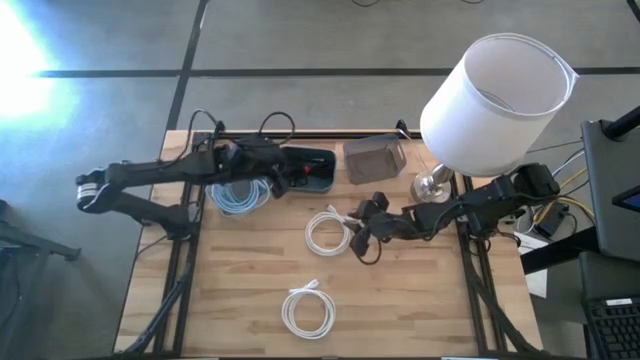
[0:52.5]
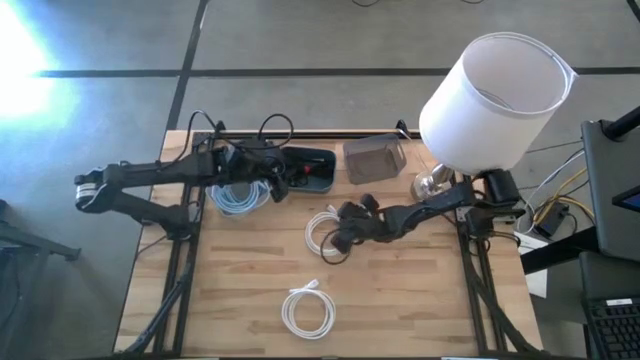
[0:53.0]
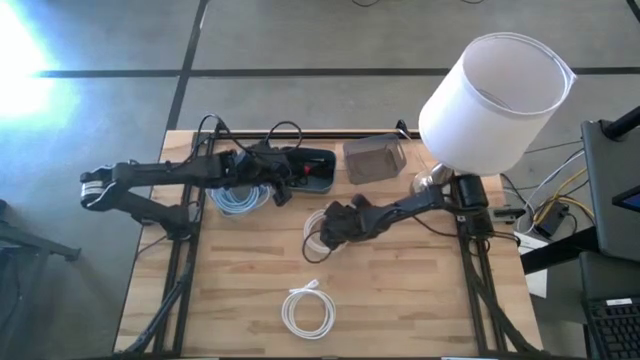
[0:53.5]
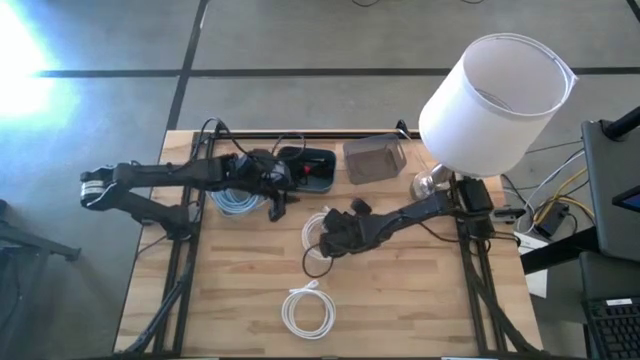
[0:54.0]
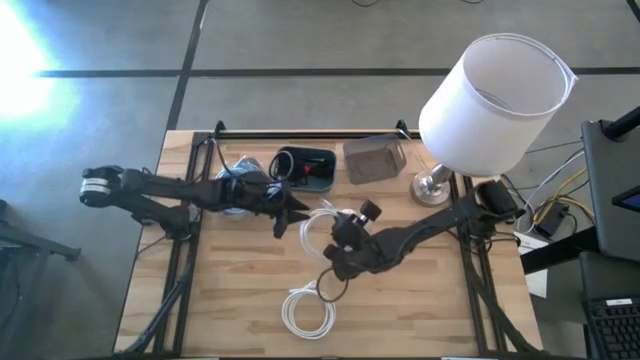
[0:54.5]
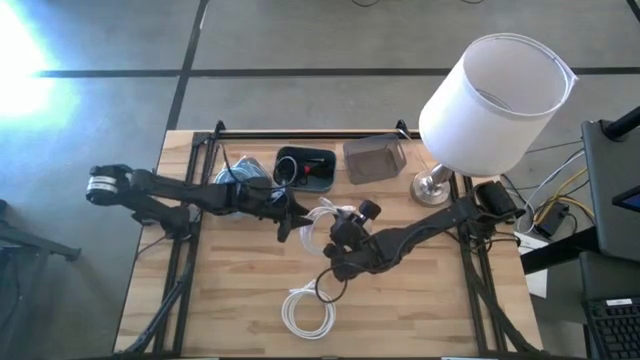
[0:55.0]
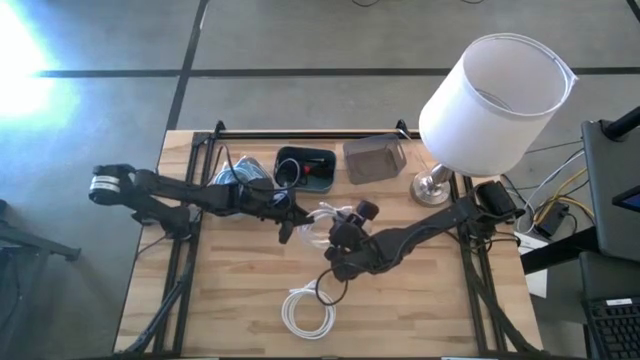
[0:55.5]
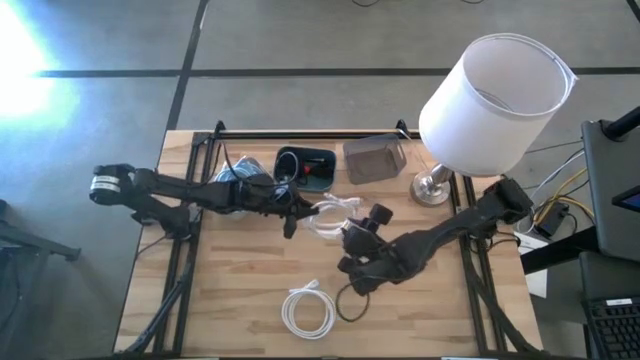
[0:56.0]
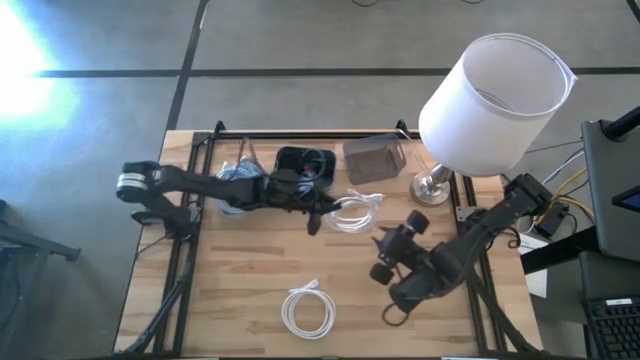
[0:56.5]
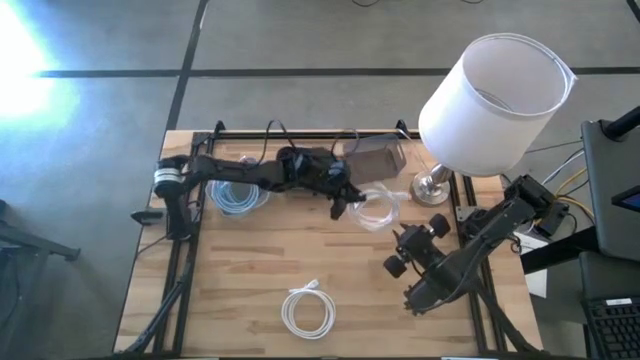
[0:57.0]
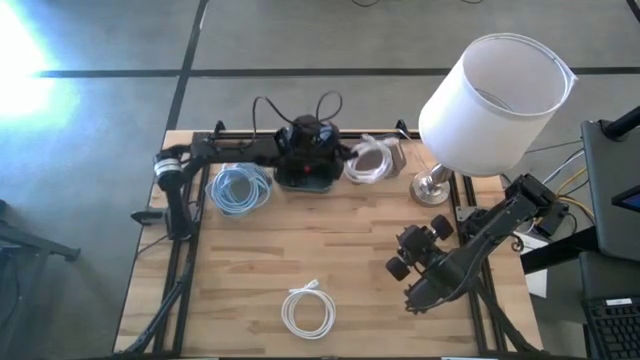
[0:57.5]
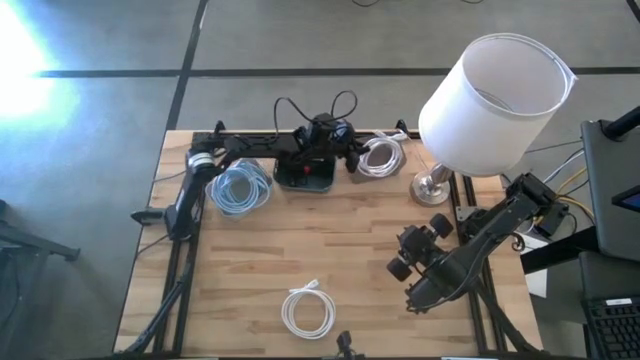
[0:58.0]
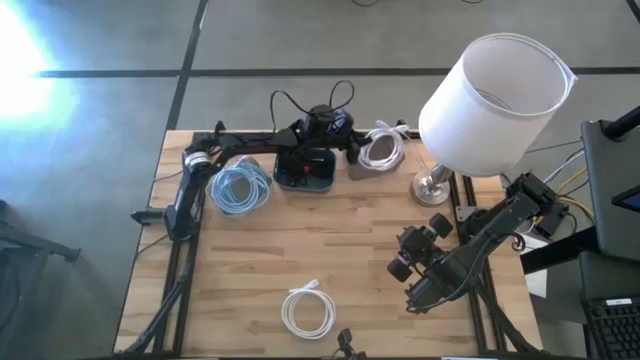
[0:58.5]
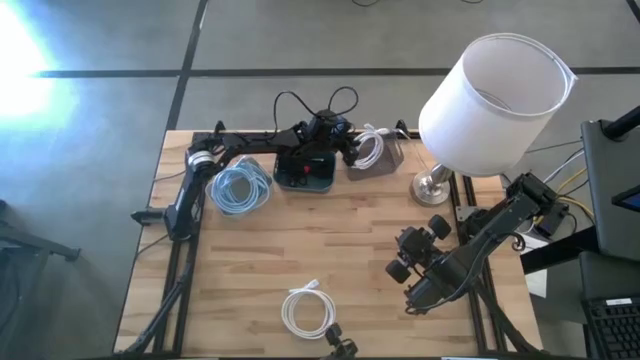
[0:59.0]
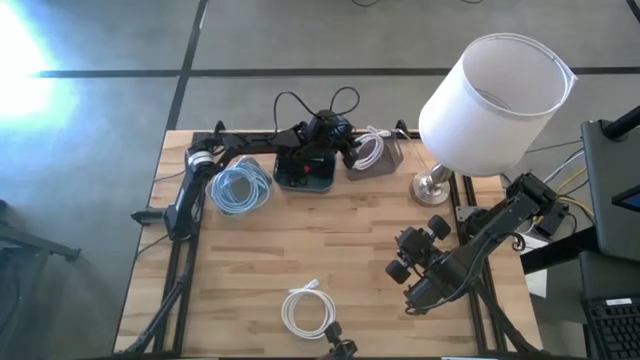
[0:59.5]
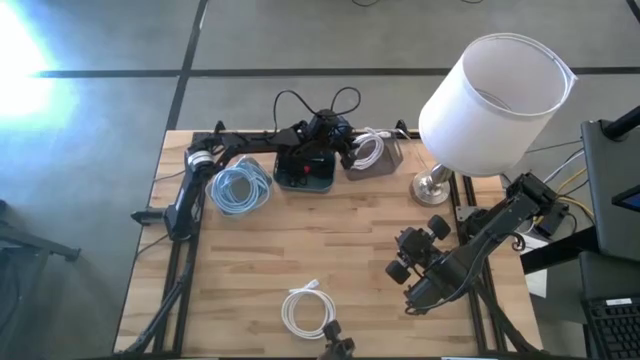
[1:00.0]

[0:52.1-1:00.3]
Task: Pick & Place USB Port
Put the top white HDMI cable into the black bin

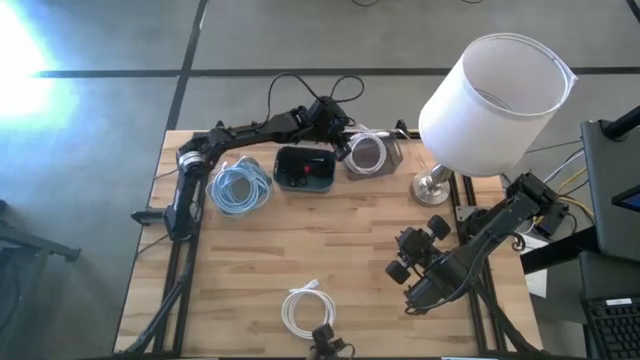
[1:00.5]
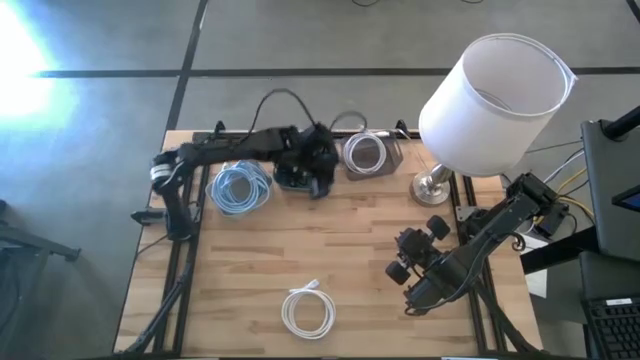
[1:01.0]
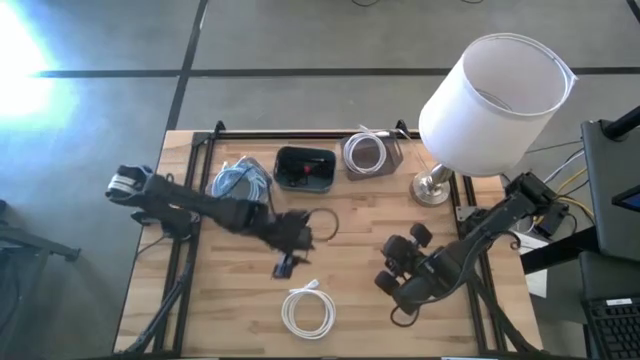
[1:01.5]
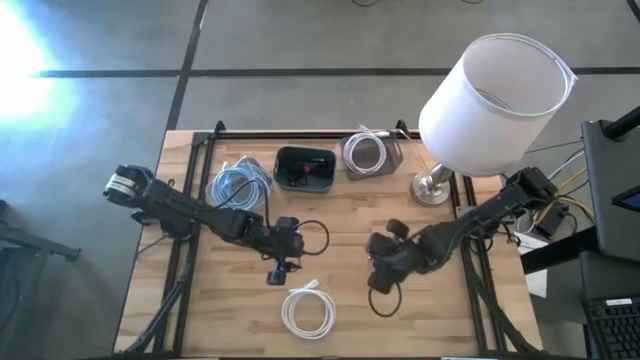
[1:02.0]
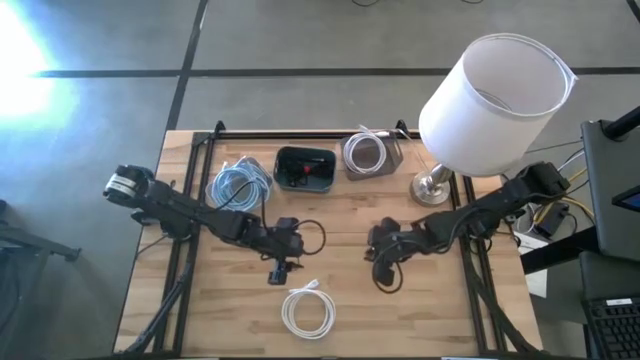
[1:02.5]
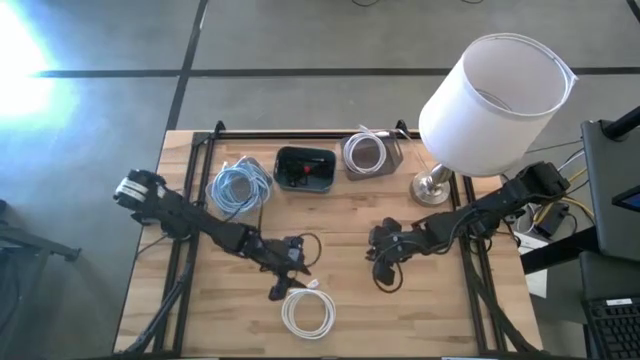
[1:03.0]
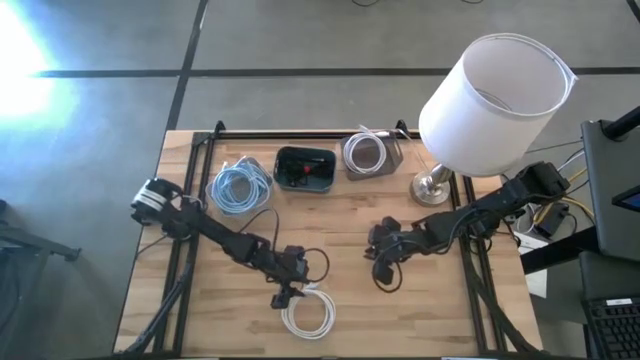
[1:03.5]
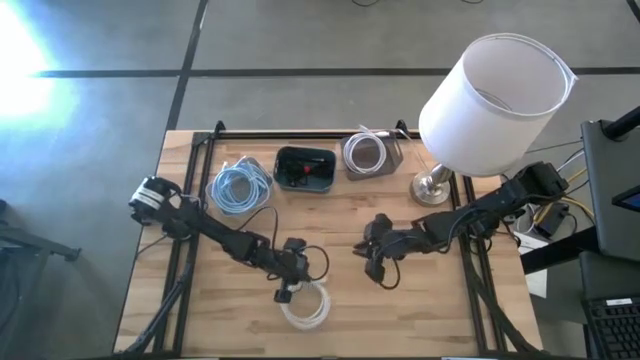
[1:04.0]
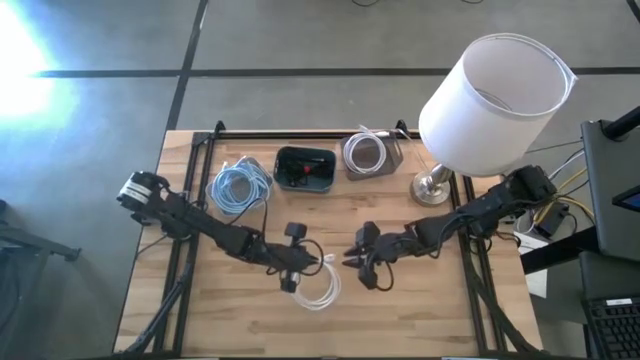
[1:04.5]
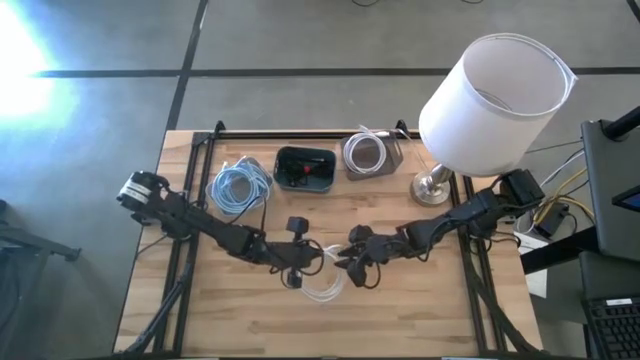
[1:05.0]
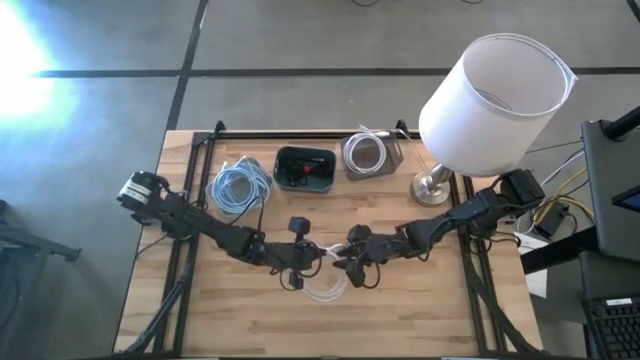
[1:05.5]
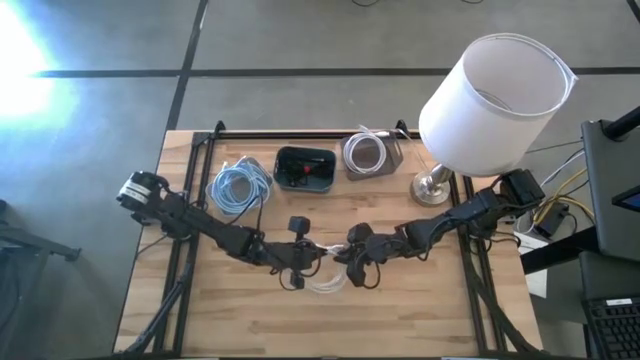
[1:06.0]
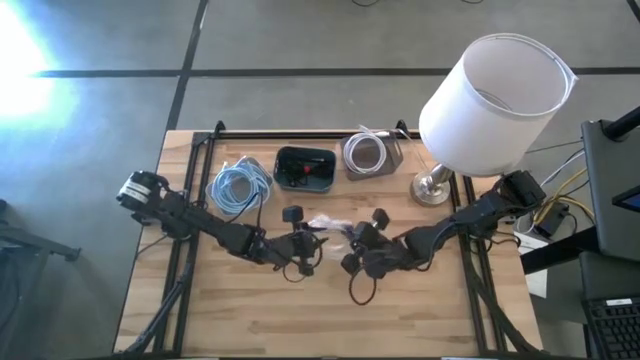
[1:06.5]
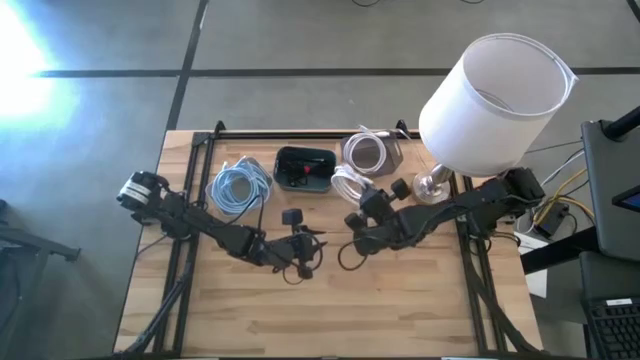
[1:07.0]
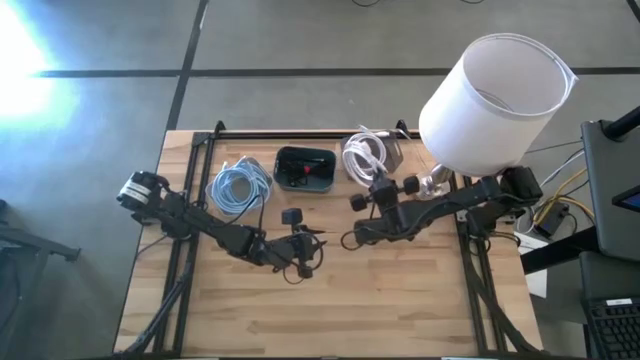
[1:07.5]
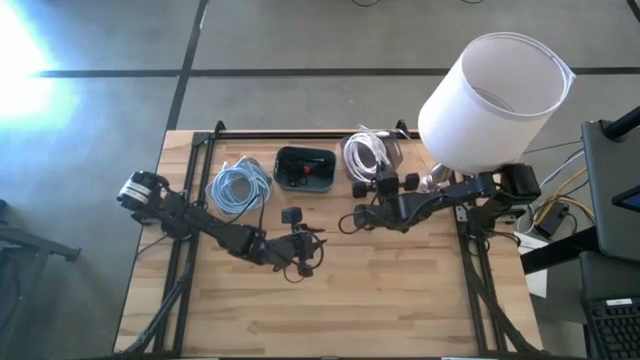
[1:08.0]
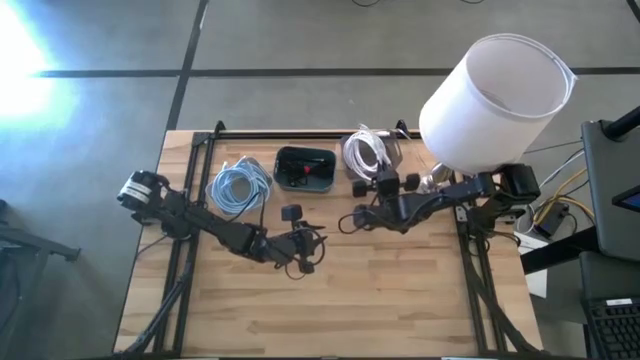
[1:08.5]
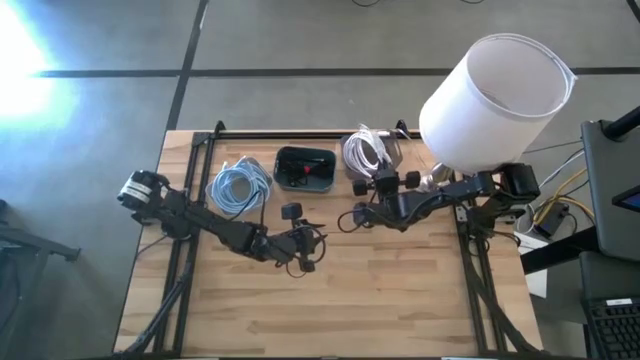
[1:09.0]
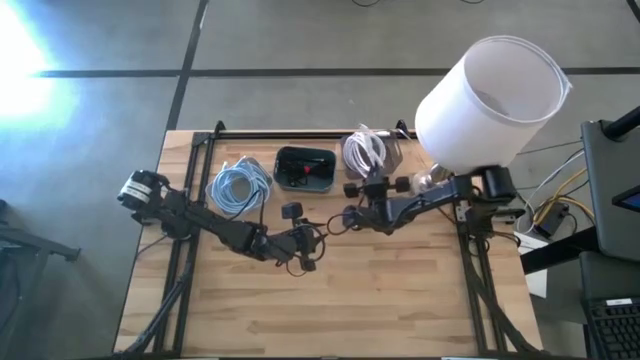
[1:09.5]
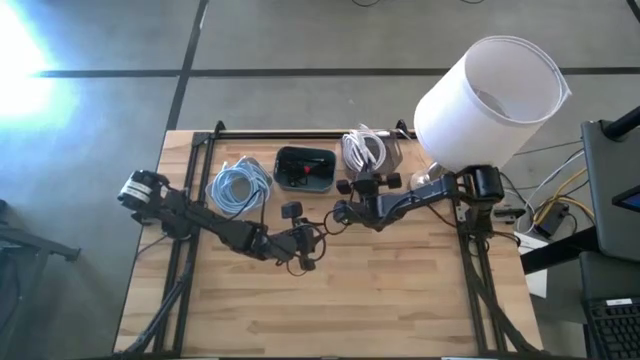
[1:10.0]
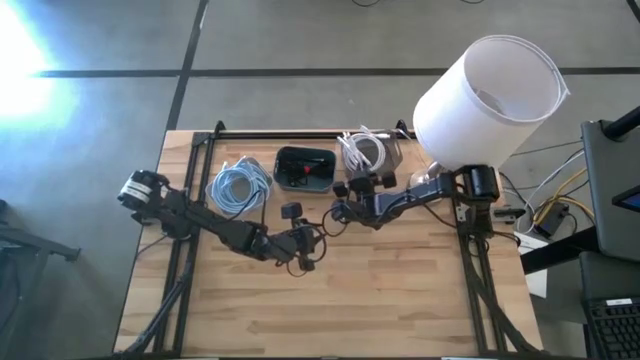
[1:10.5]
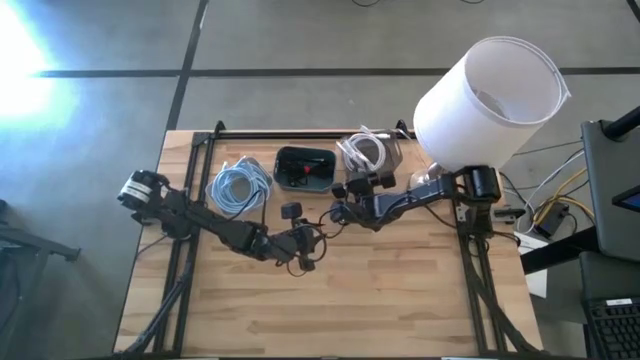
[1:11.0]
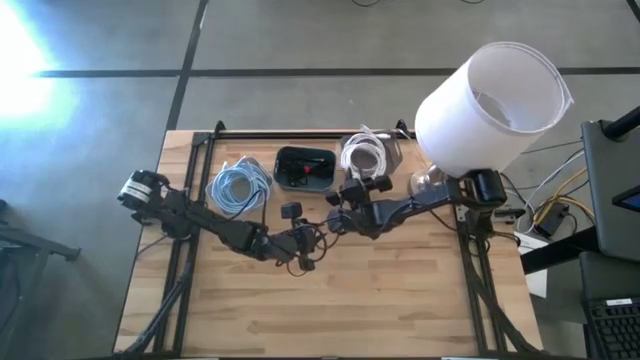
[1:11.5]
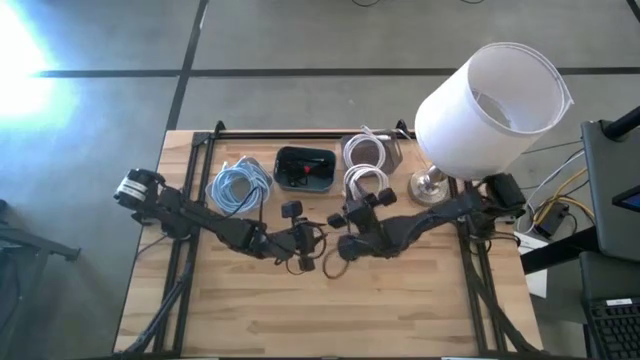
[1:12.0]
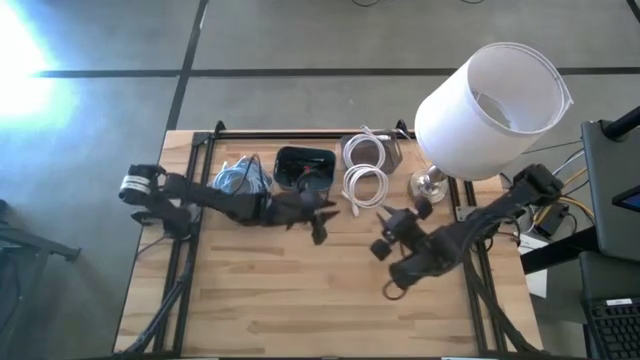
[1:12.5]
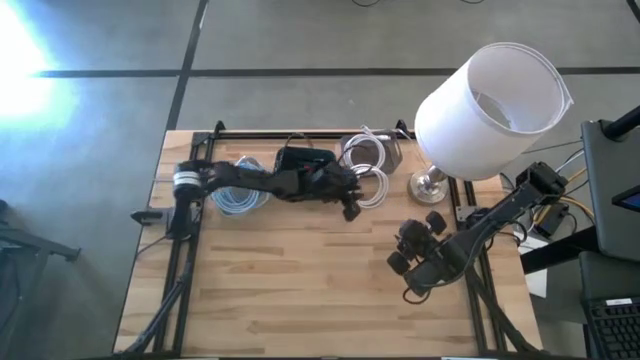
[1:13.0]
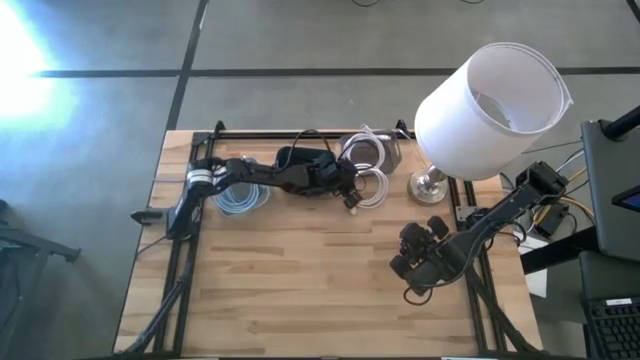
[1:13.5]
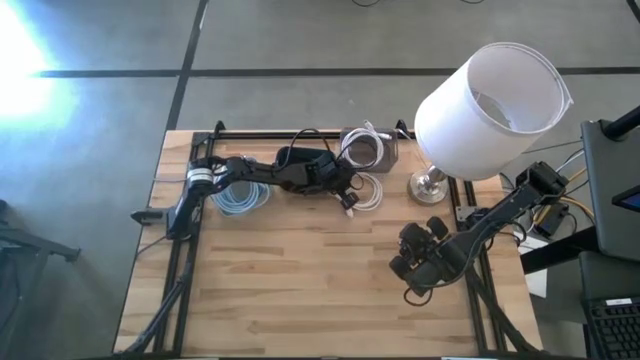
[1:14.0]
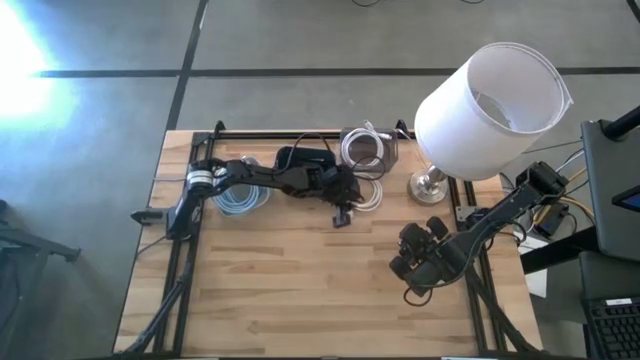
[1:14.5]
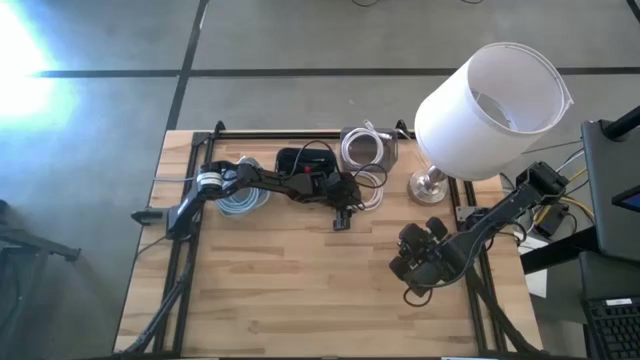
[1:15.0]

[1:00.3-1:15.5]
Put the white HDMI cable into the black bin
